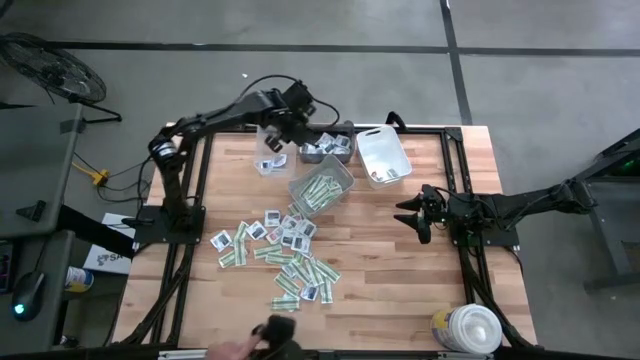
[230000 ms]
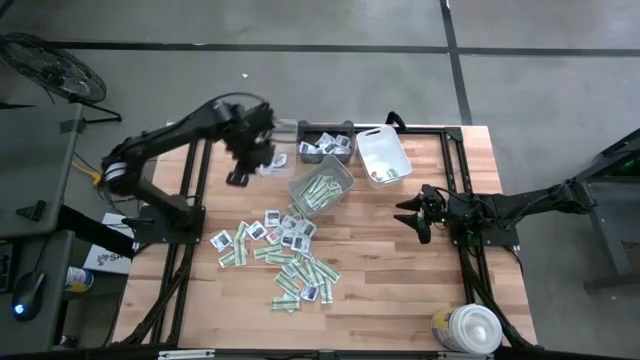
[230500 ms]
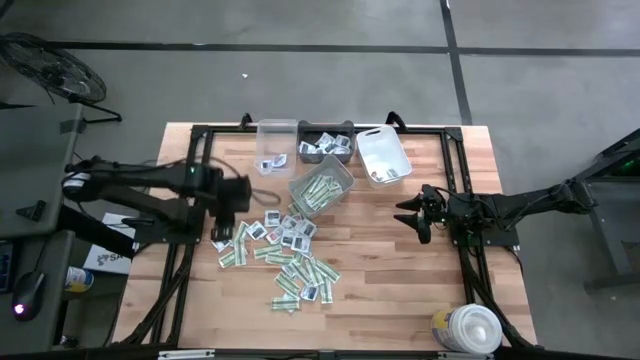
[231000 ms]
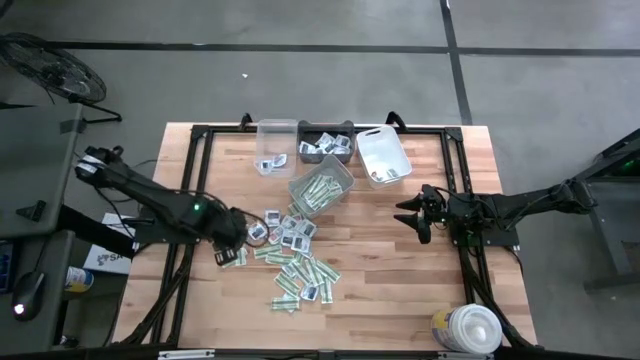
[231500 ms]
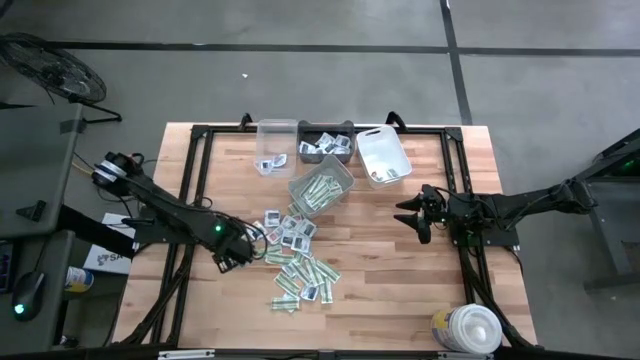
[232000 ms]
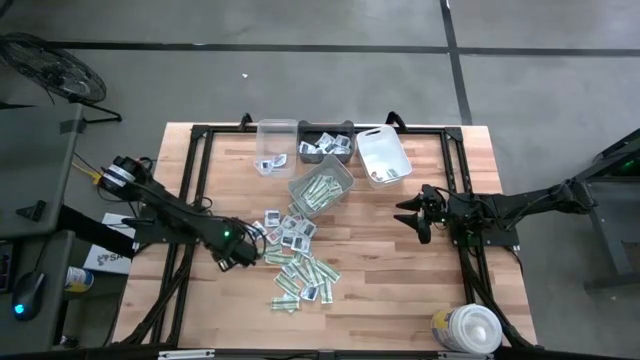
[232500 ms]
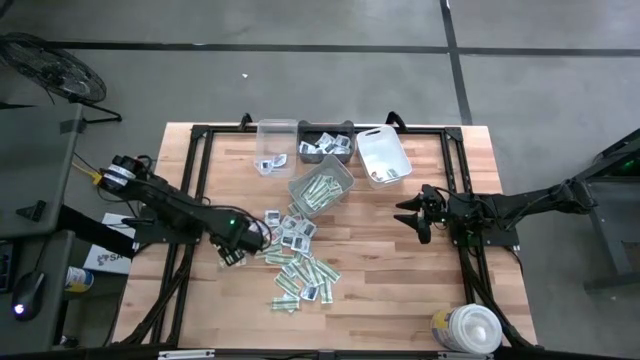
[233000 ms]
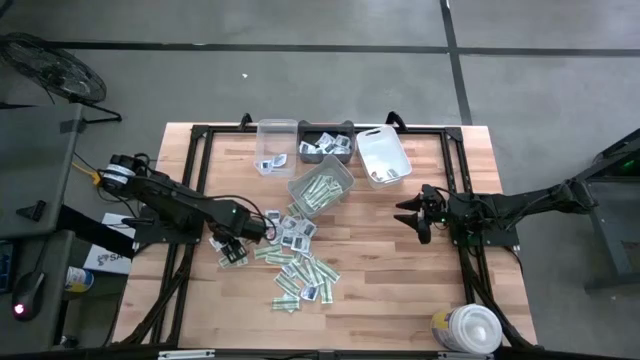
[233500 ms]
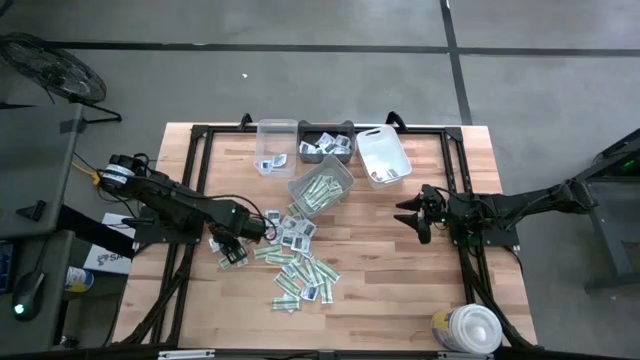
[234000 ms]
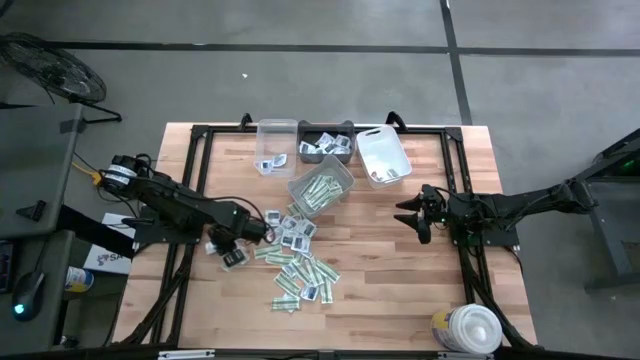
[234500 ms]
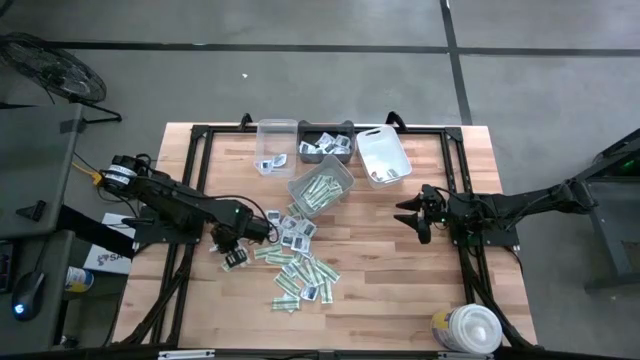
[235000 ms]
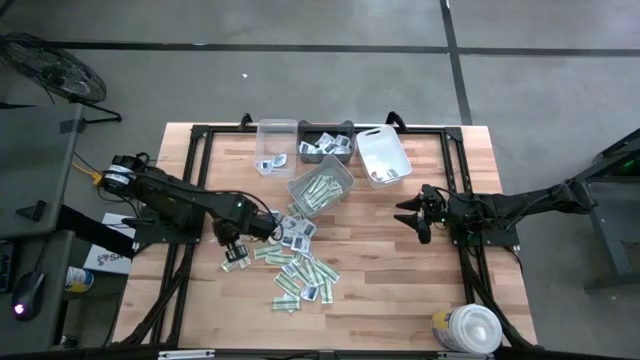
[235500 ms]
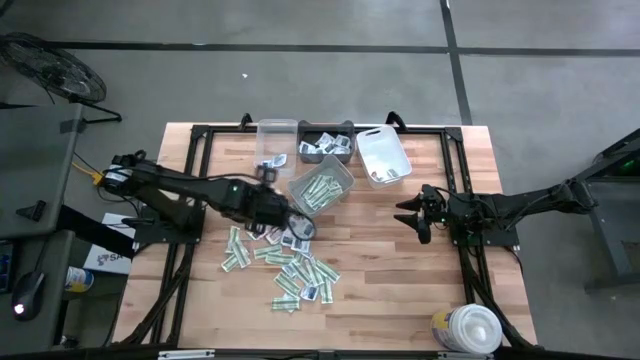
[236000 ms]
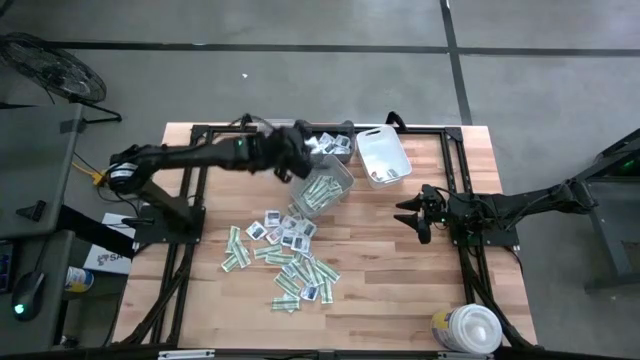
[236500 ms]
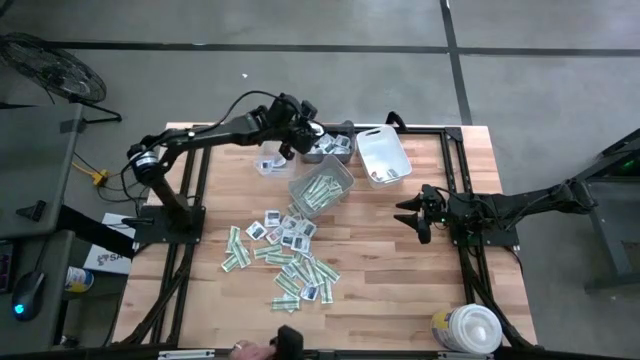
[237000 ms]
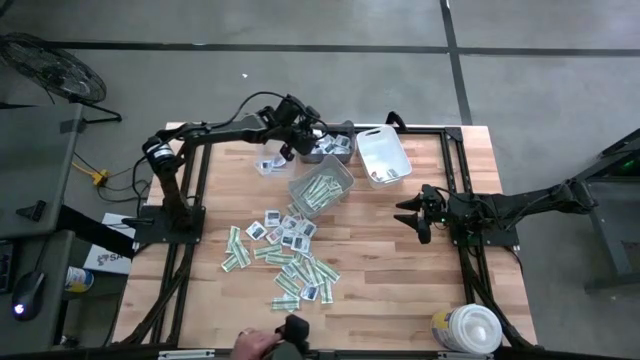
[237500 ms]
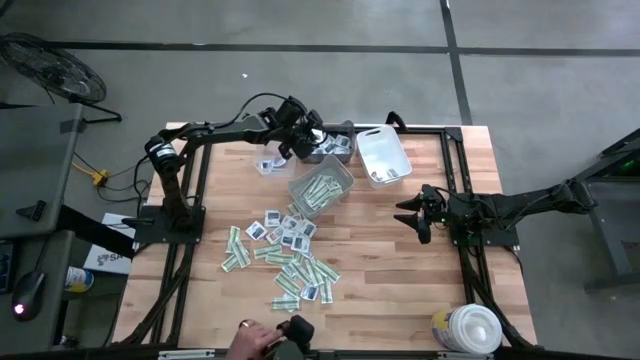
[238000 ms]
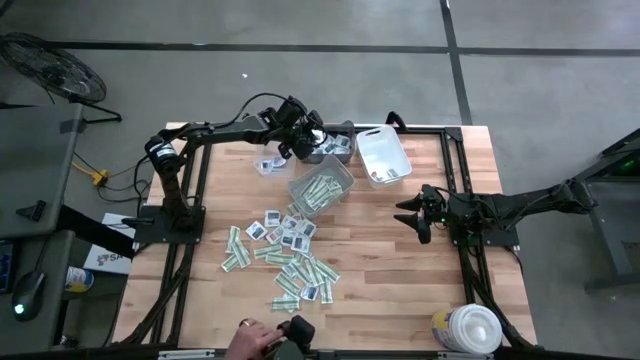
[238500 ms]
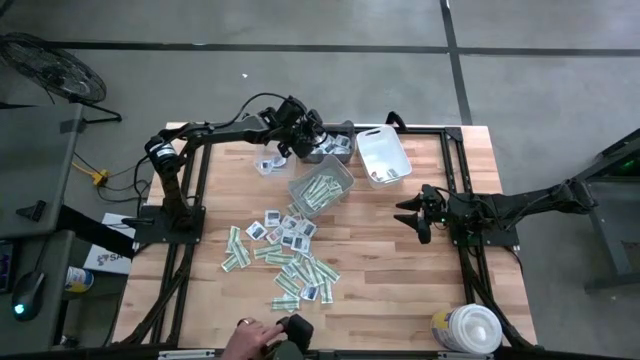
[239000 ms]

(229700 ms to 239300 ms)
Task: Pick & Place First Aid Supplies
Put the towelette pack into the black bin

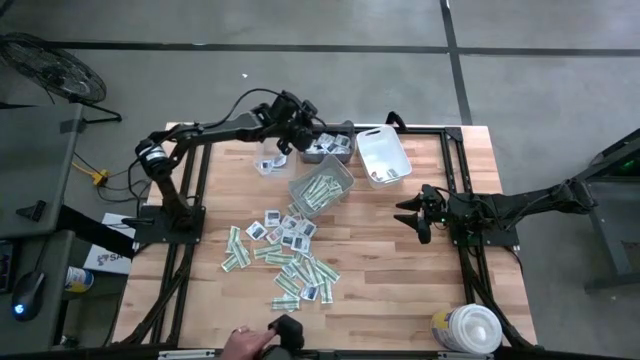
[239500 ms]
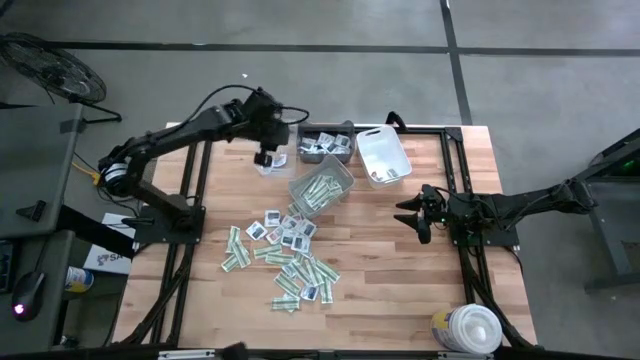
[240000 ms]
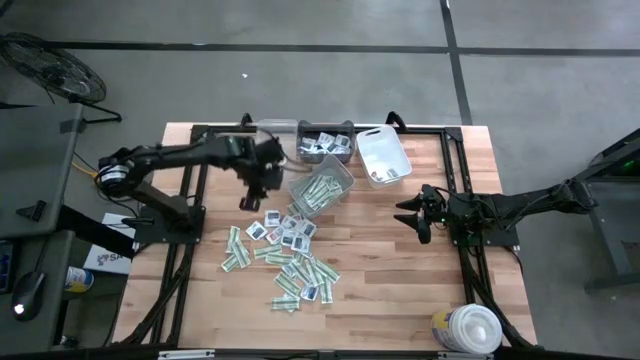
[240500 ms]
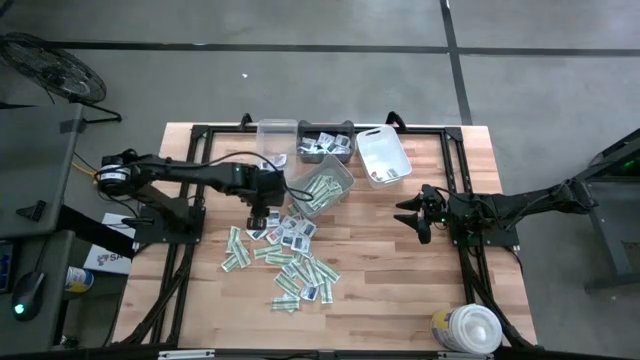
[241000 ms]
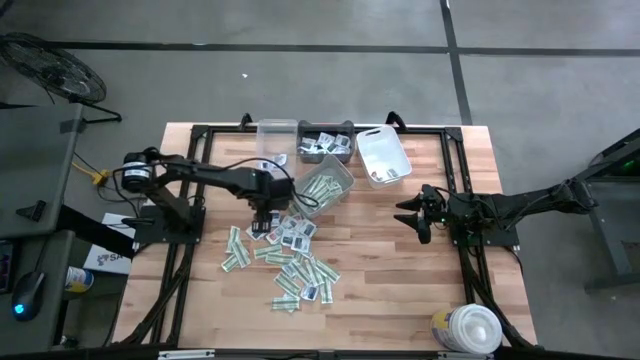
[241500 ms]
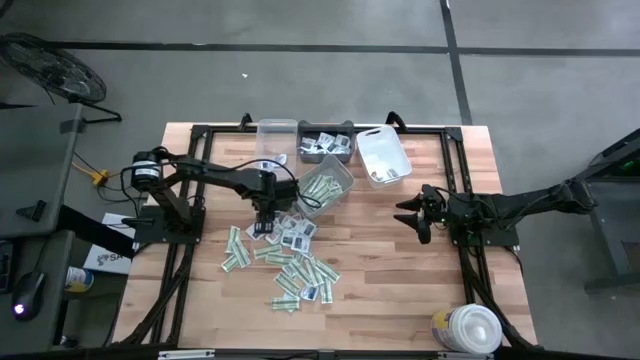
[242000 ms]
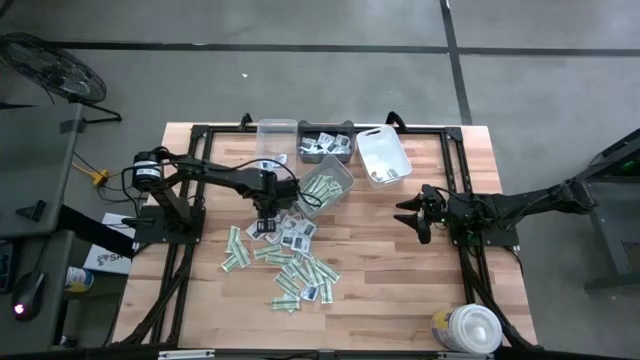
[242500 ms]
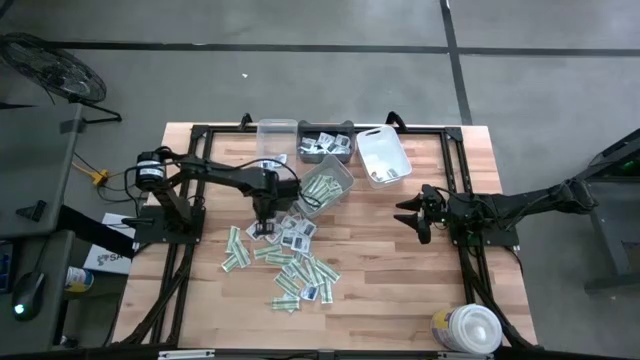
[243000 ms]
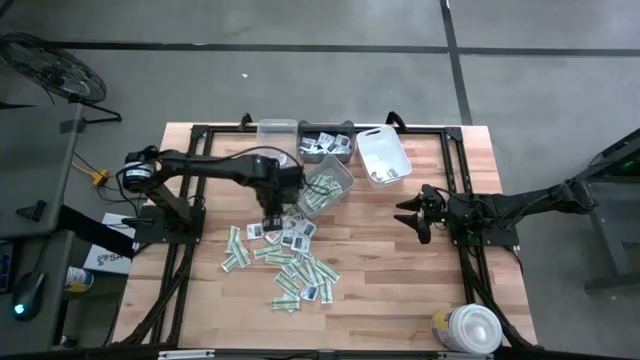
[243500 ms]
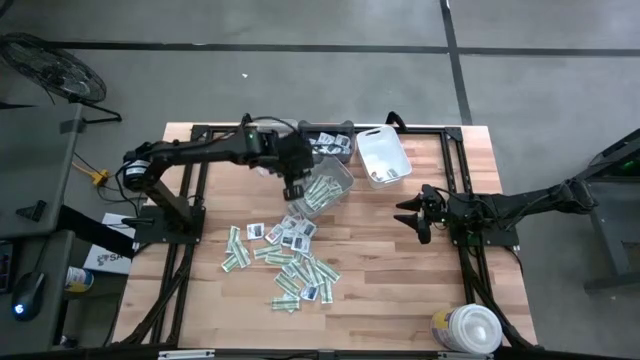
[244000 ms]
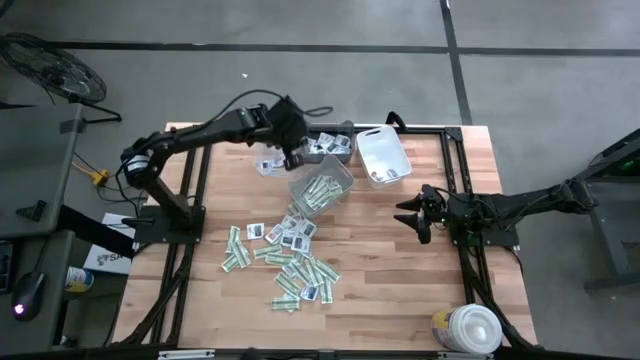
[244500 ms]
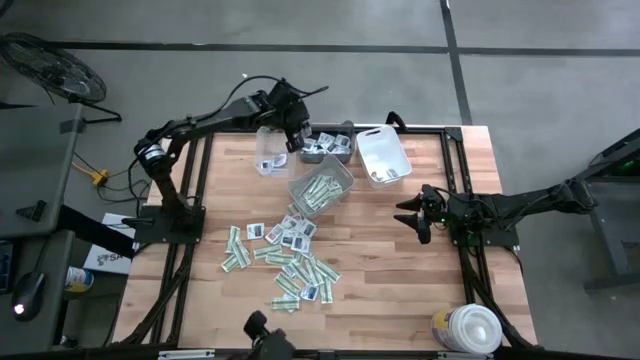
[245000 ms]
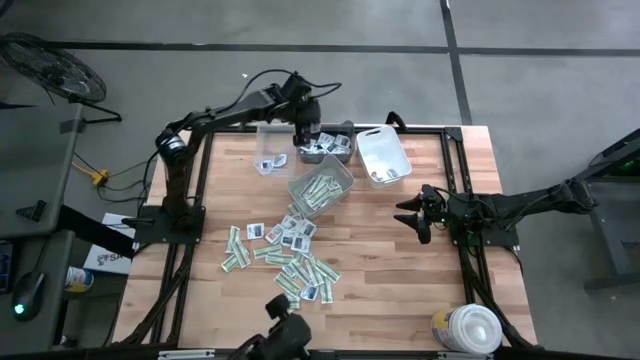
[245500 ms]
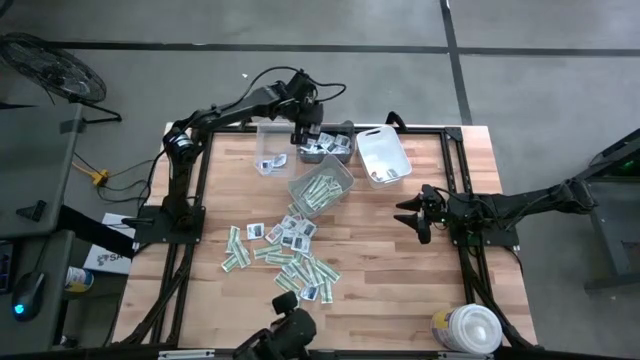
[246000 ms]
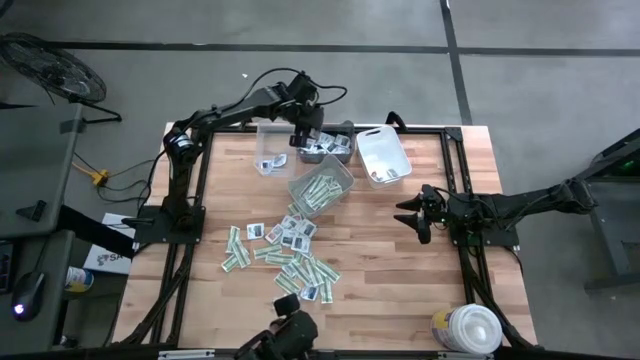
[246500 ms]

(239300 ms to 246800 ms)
Put the towelette pack into the black bin

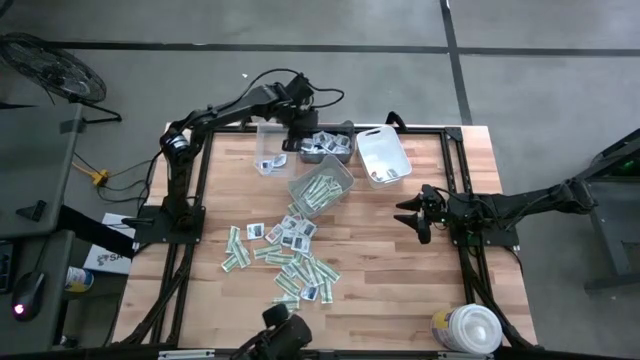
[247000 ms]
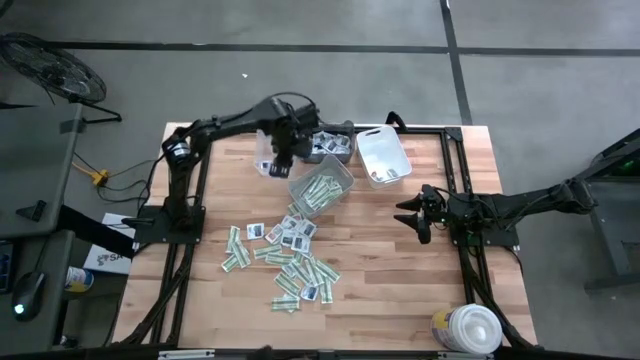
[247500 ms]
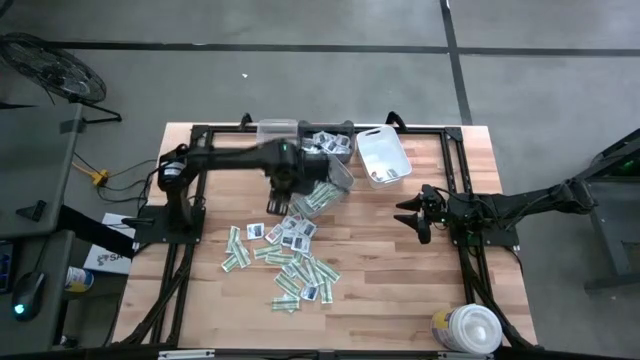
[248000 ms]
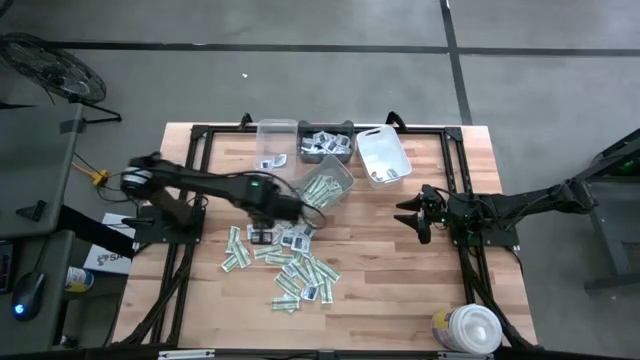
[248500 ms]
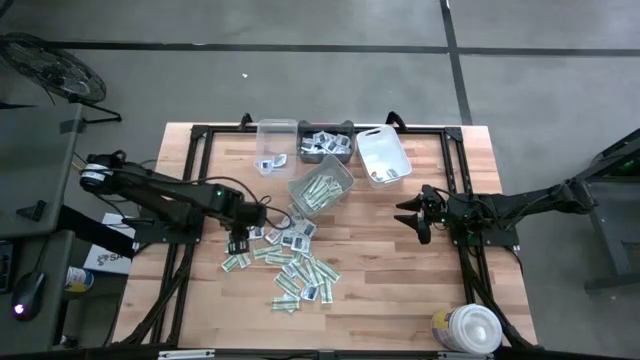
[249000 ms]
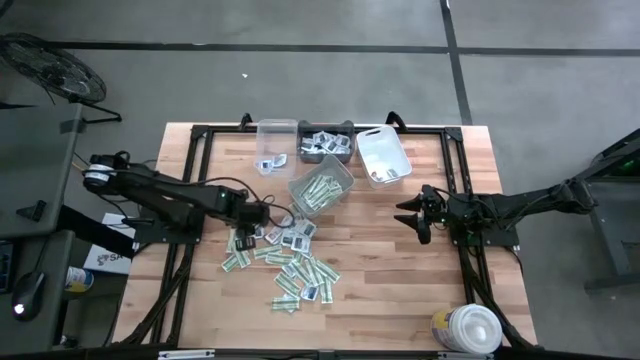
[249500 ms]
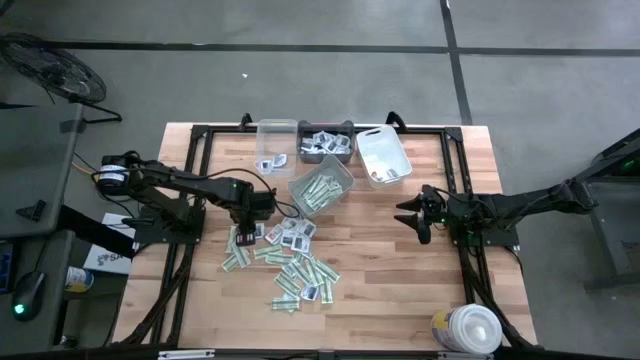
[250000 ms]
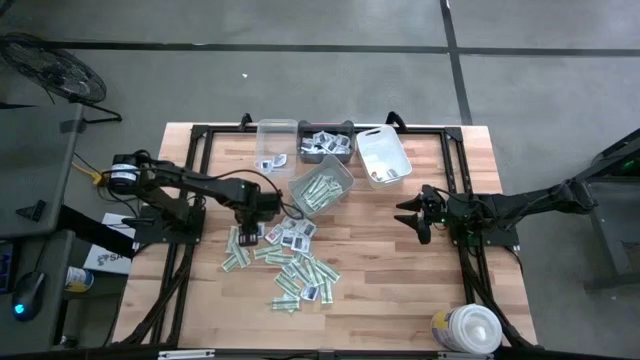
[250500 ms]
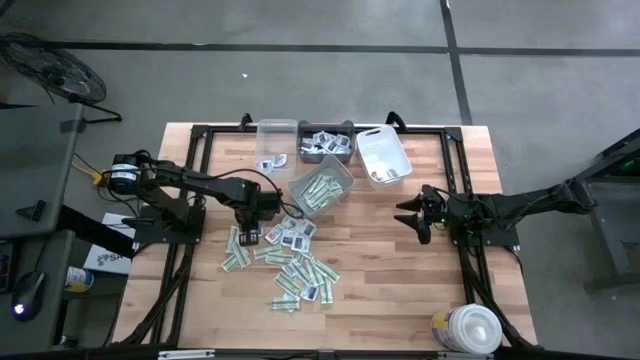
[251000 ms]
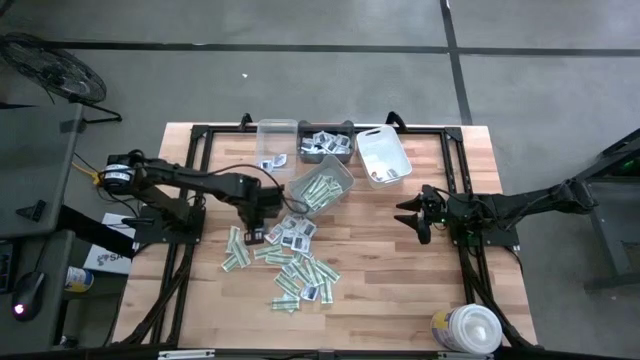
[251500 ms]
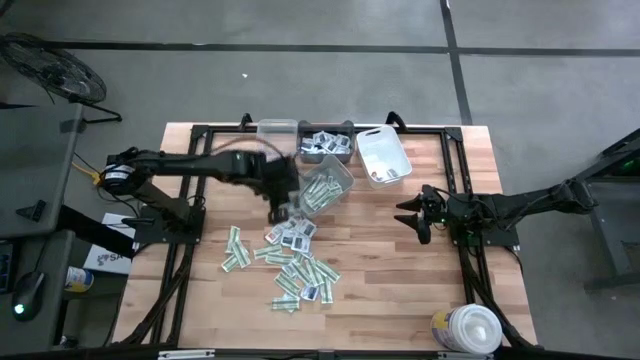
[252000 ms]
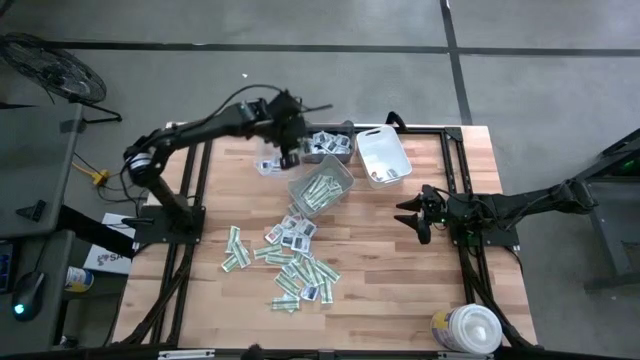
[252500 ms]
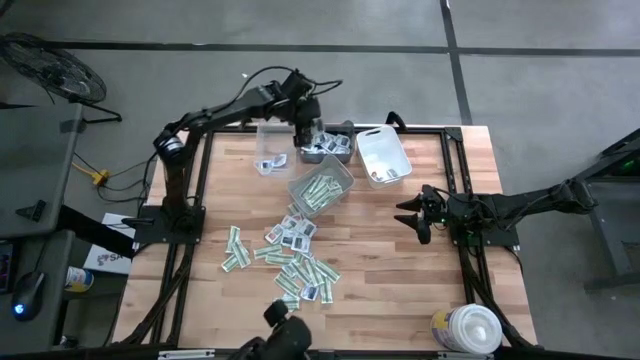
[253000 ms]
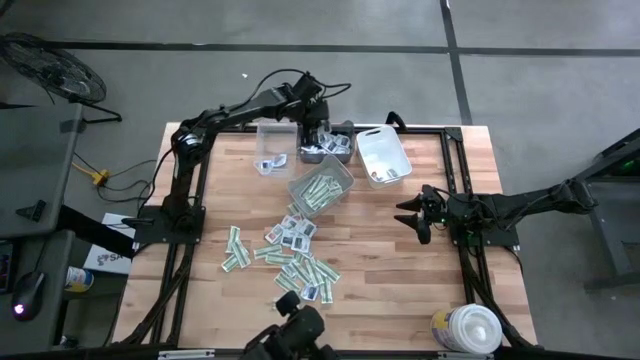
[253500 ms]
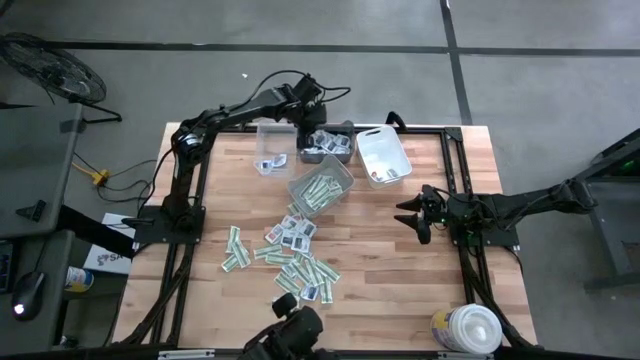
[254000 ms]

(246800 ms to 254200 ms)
Put the towelette pack into the black bin
